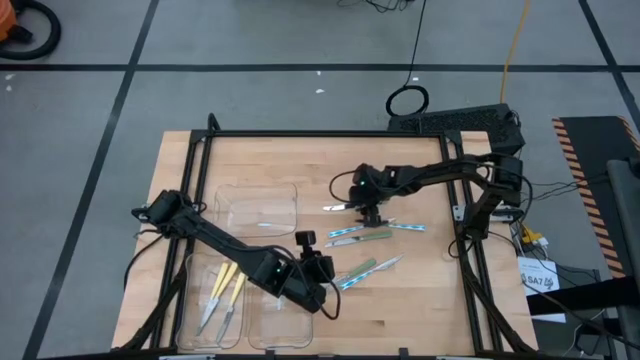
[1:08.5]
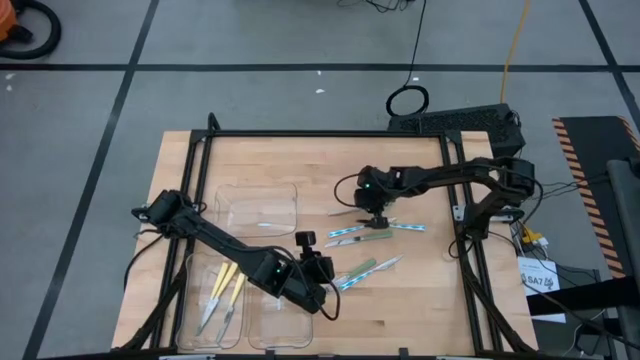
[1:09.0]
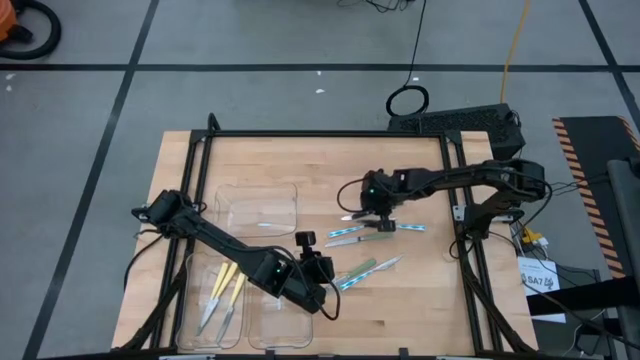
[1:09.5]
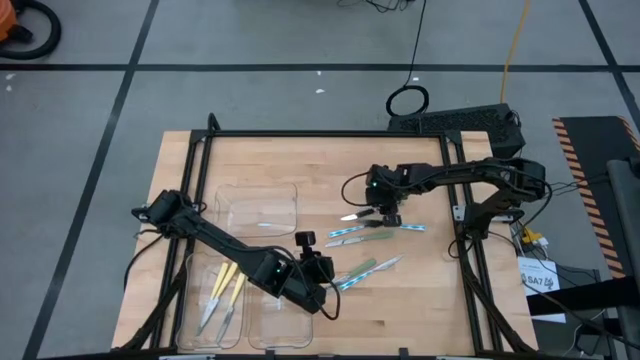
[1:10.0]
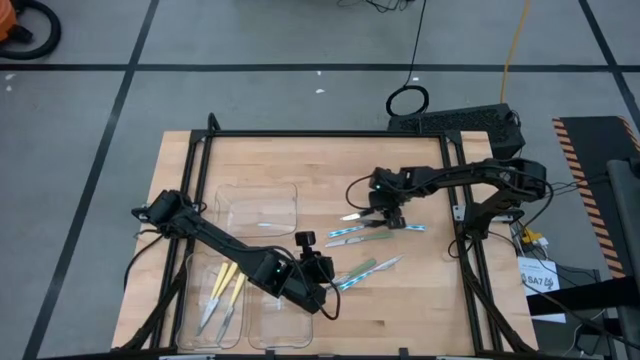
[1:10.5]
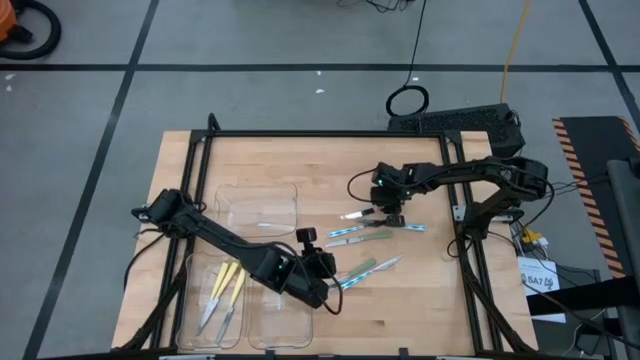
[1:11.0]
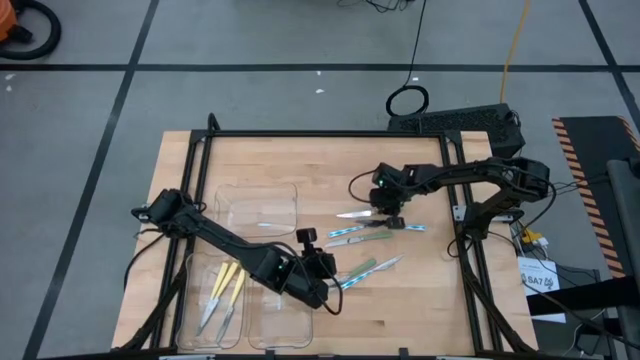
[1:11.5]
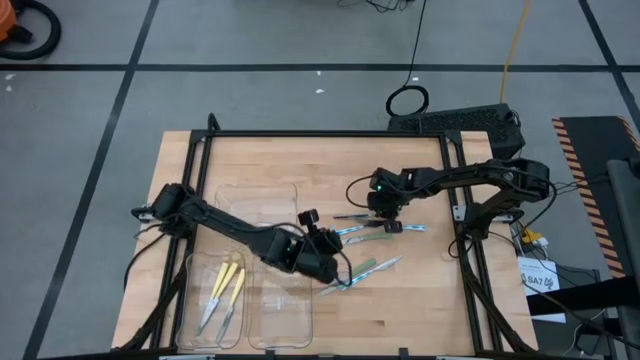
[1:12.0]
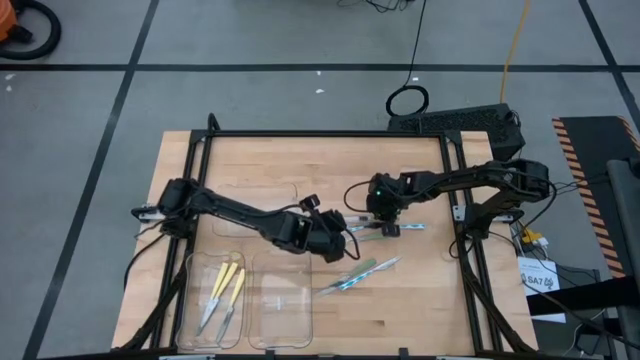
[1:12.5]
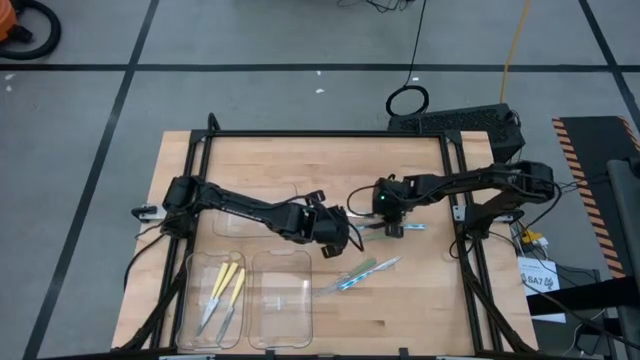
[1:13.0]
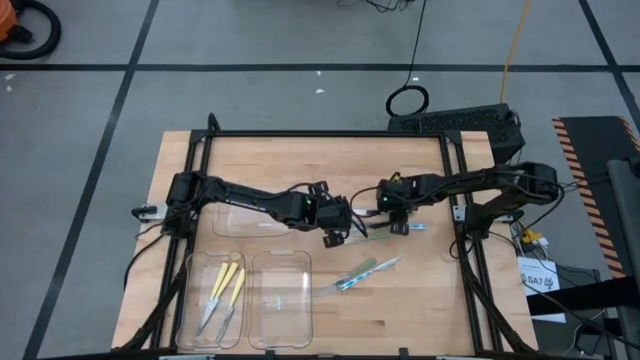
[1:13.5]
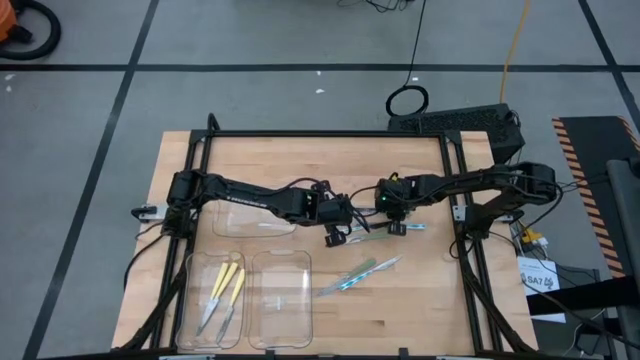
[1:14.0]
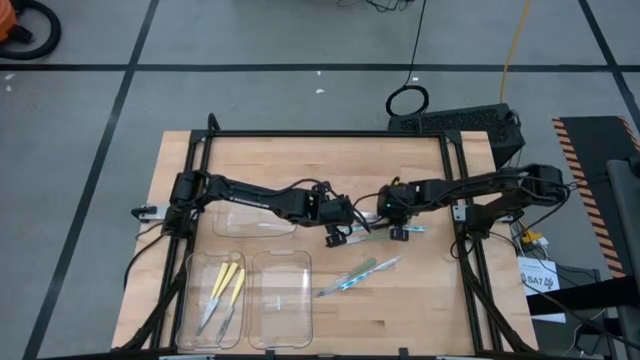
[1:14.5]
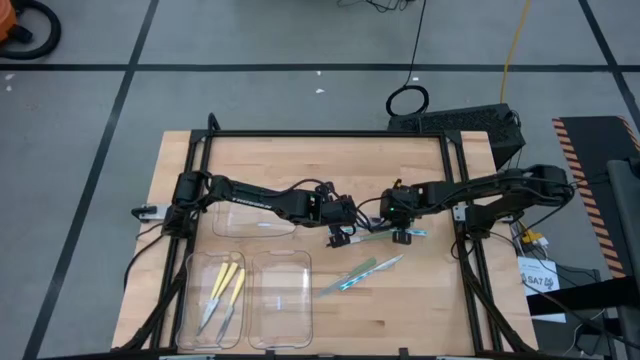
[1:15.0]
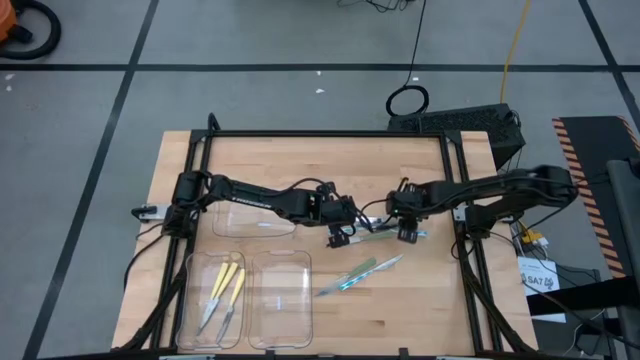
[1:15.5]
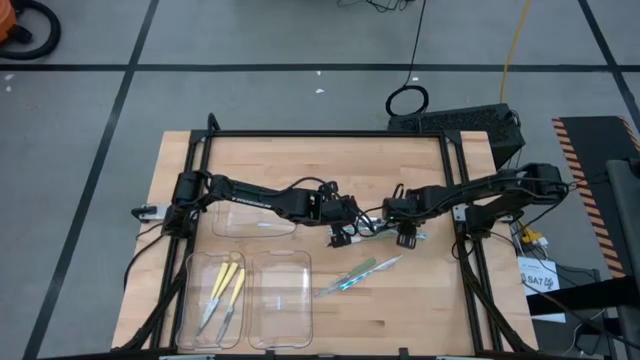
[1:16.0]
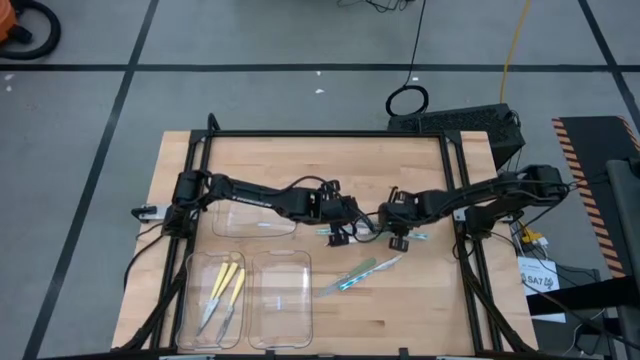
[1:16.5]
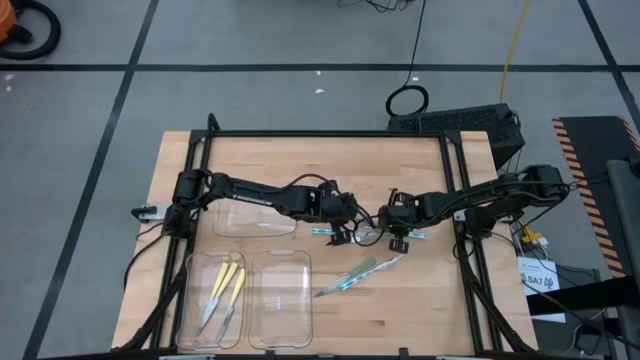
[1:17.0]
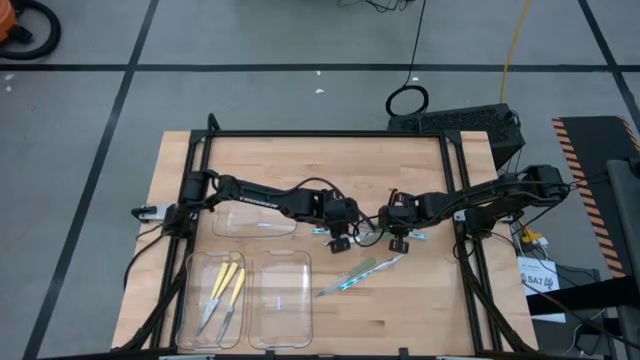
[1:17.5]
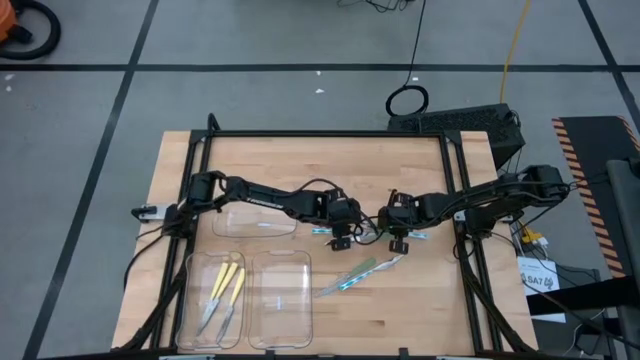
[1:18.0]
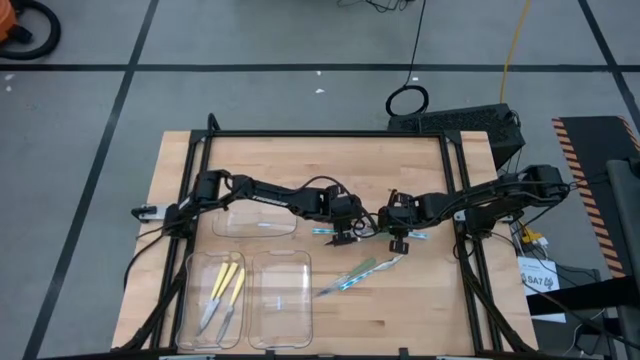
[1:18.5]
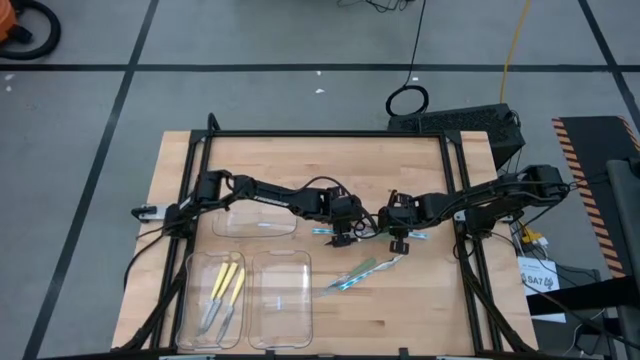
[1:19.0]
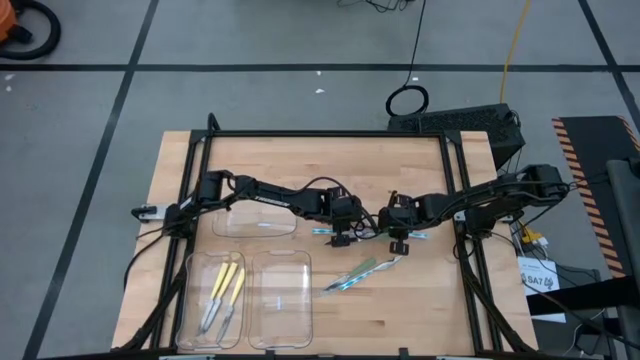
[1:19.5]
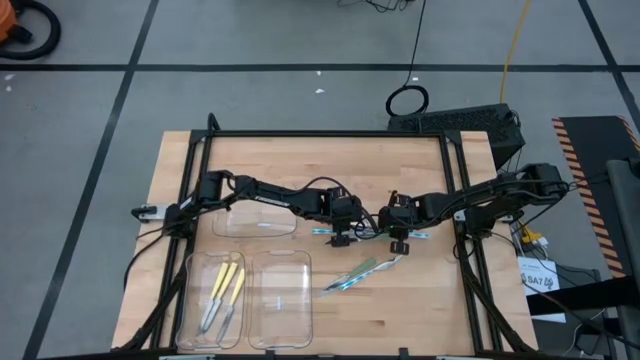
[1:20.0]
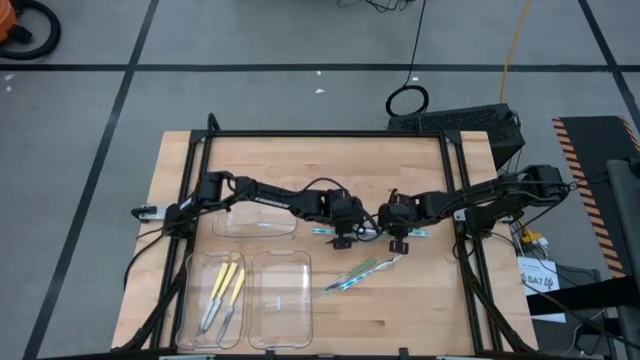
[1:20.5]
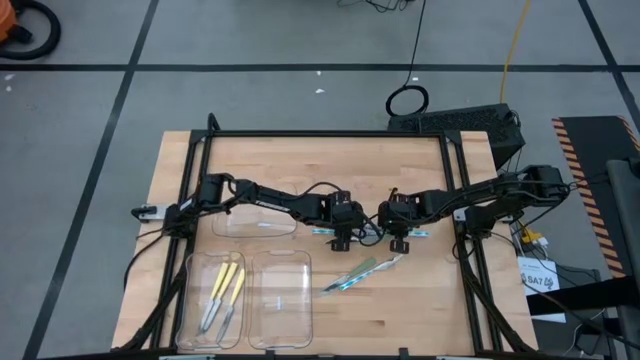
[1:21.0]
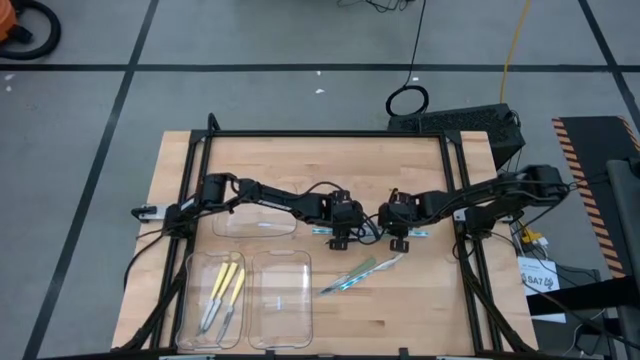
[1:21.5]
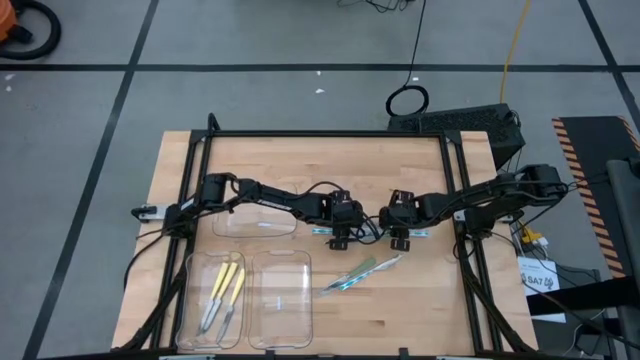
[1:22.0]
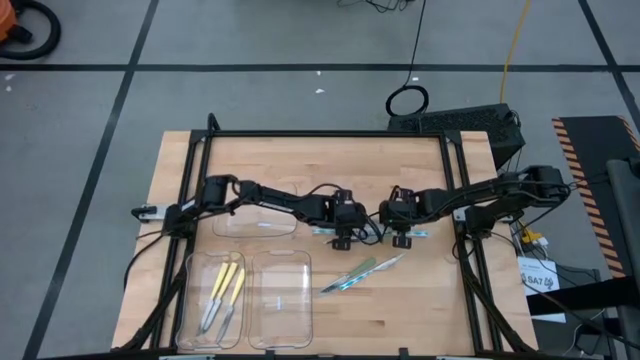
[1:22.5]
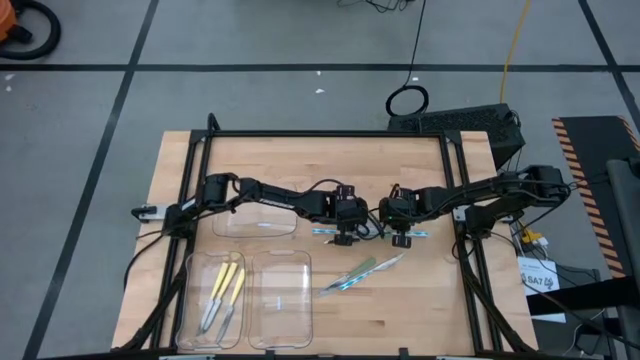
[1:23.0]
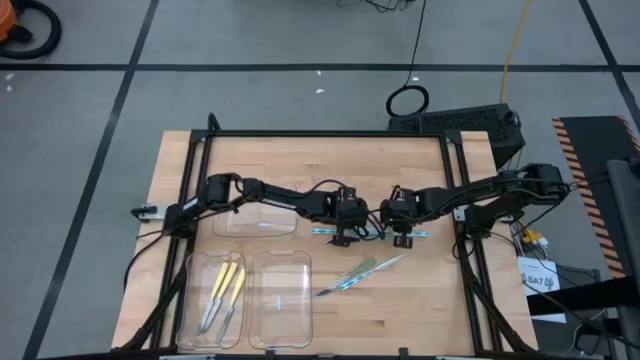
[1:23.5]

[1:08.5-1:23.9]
Task: Sort silverware by color (type)
Put the bottom green table knife into the top transparent bin

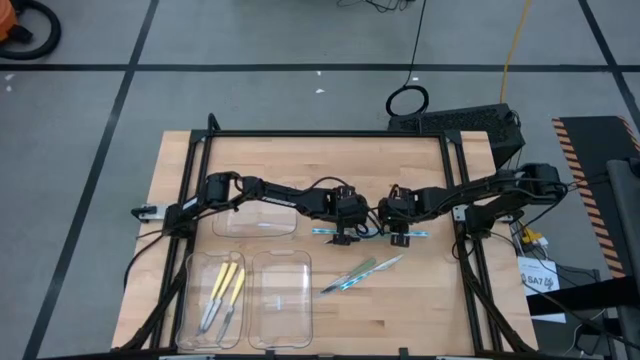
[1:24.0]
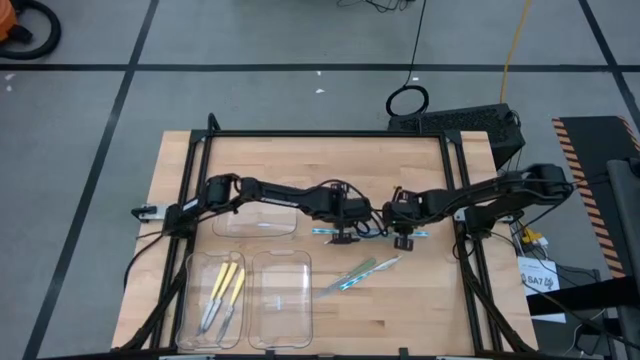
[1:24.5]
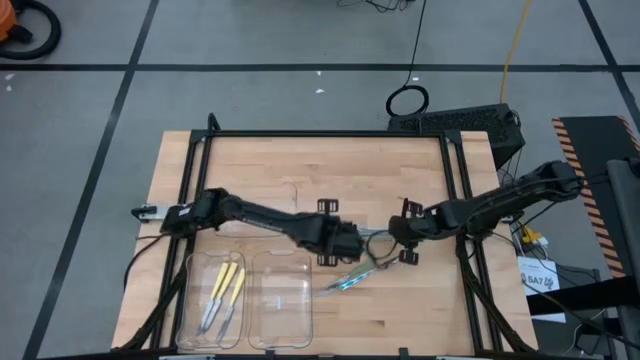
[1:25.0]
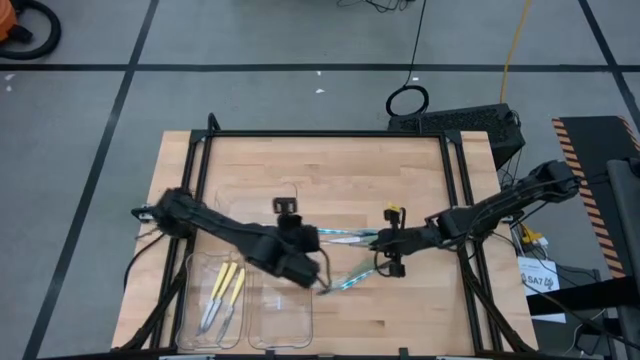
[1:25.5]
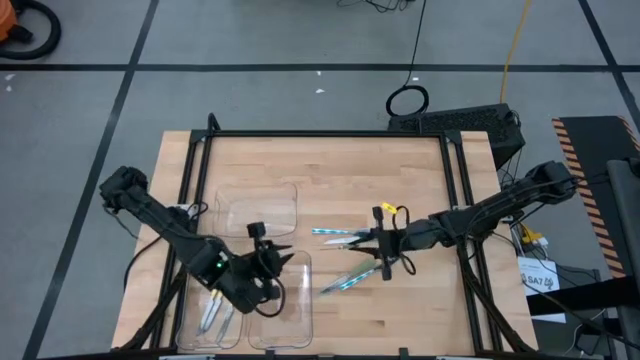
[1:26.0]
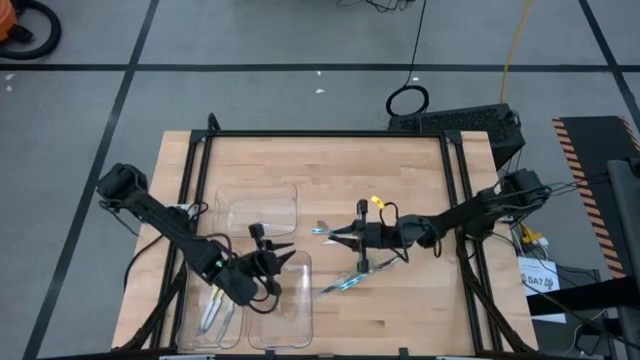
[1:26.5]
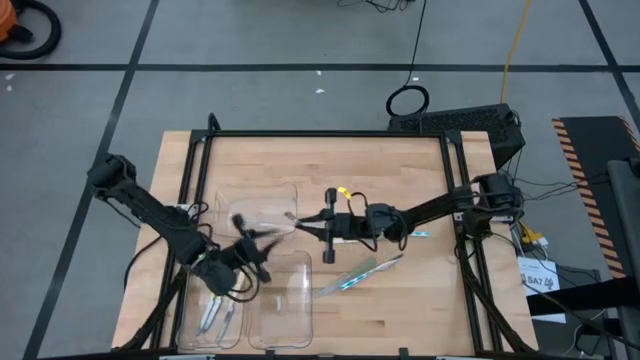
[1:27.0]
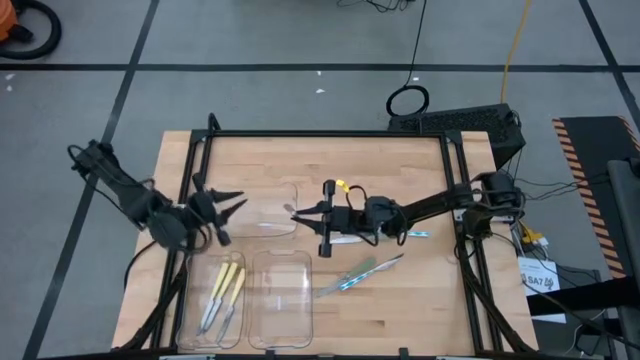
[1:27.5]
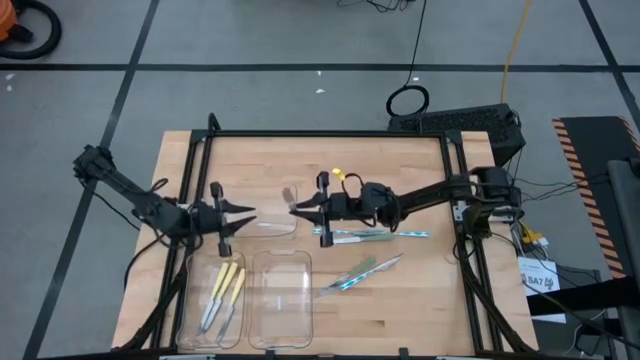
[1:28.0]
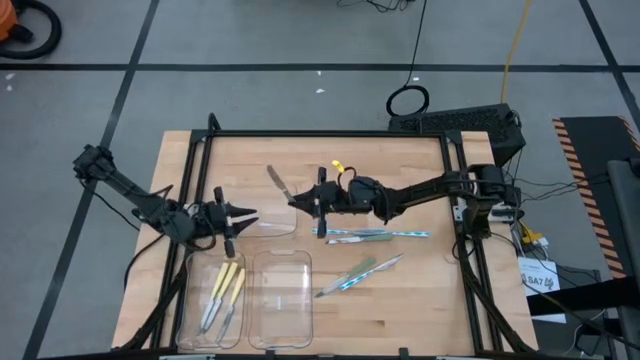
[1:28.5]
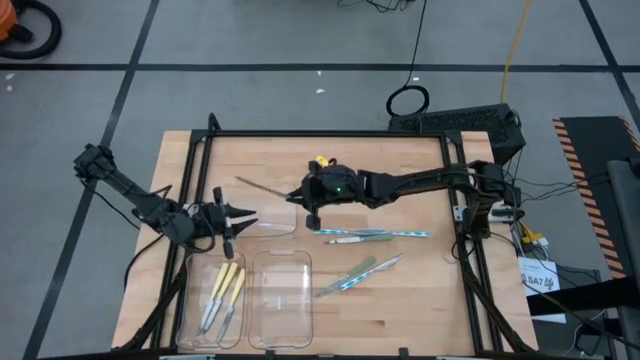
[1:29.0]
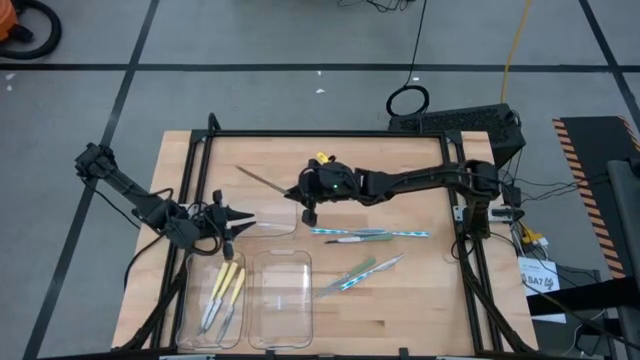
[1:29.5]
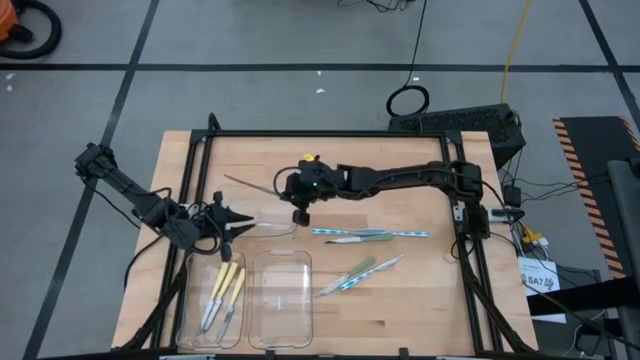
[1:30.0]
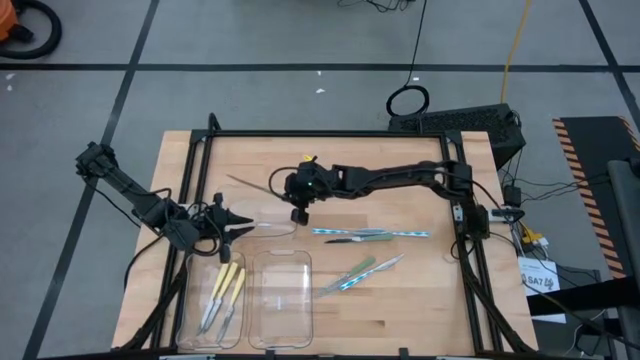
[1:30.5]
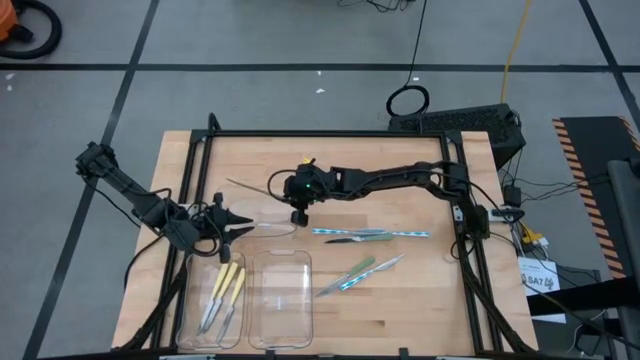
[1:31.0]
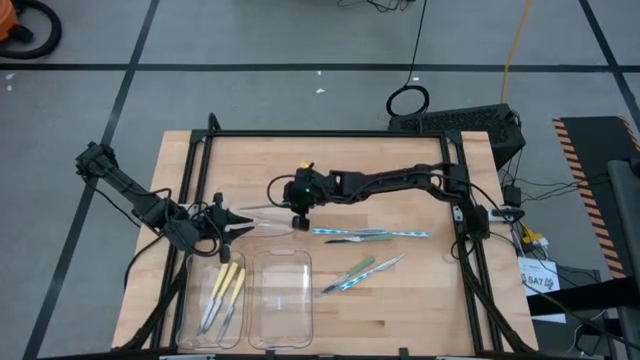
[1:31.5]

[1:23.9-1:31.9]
Put the bottom green table knife into the top transparent bin
